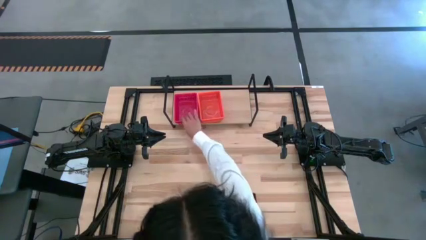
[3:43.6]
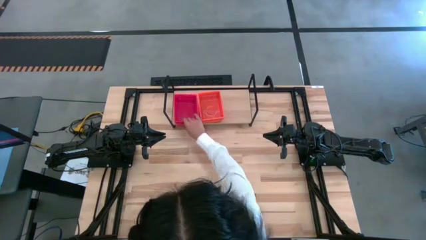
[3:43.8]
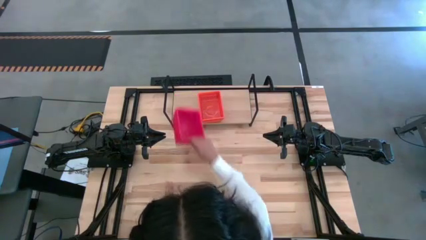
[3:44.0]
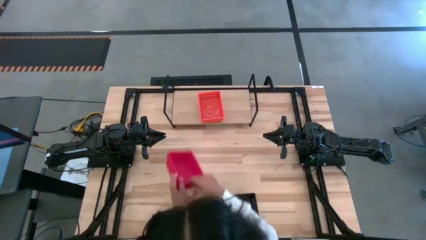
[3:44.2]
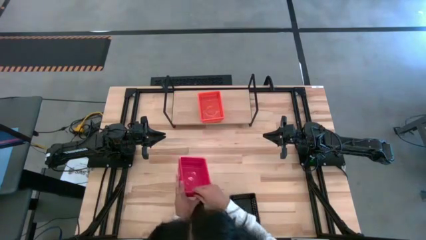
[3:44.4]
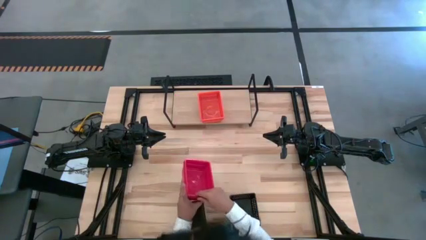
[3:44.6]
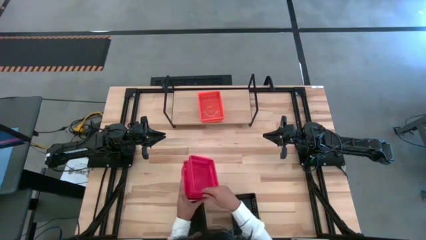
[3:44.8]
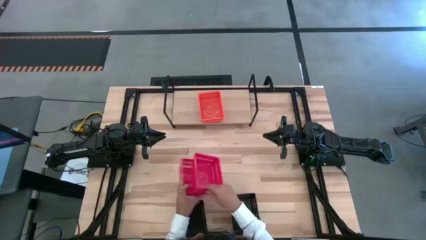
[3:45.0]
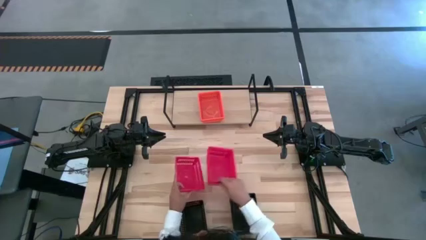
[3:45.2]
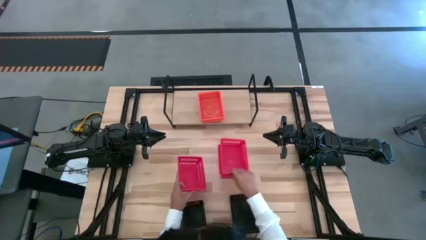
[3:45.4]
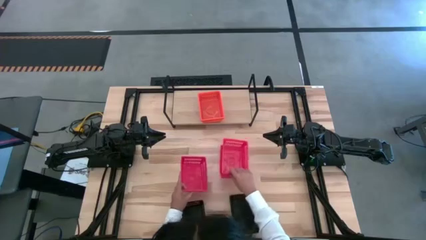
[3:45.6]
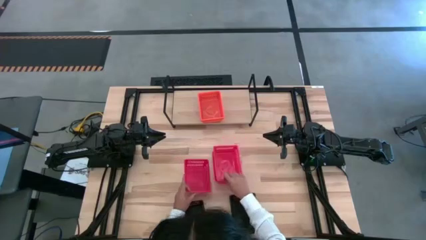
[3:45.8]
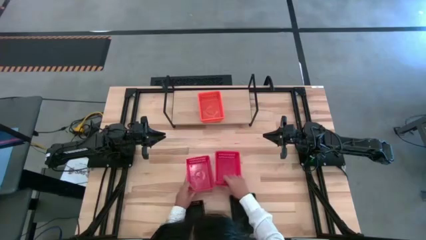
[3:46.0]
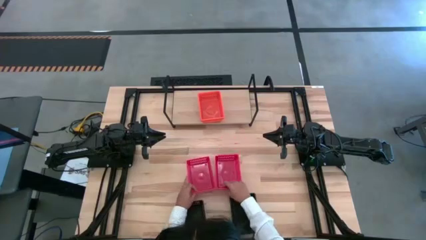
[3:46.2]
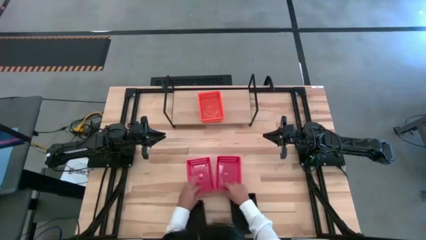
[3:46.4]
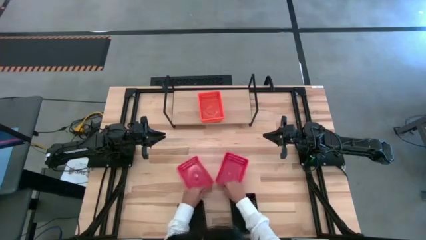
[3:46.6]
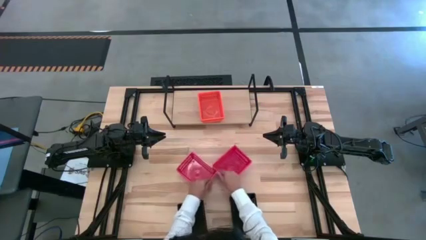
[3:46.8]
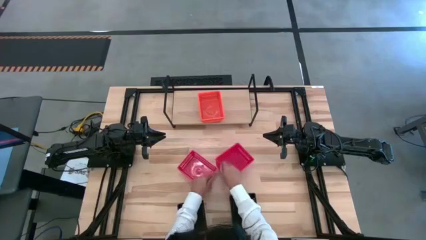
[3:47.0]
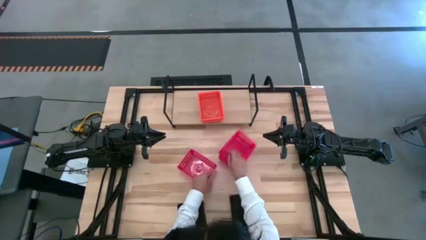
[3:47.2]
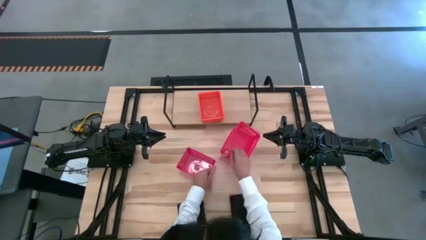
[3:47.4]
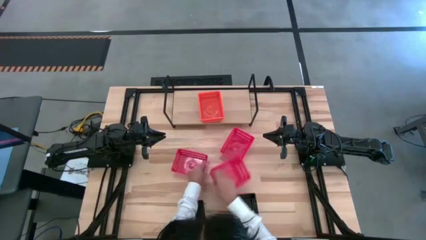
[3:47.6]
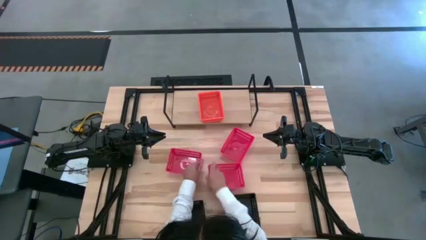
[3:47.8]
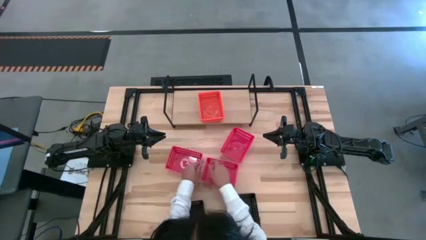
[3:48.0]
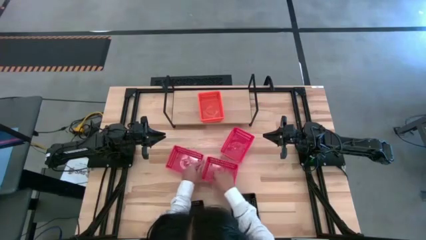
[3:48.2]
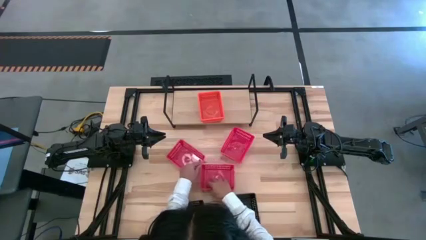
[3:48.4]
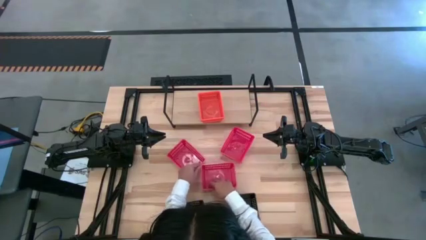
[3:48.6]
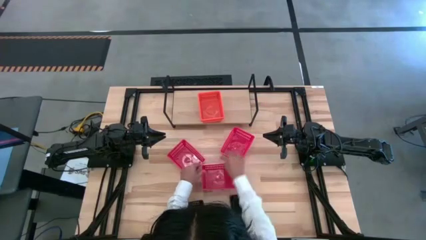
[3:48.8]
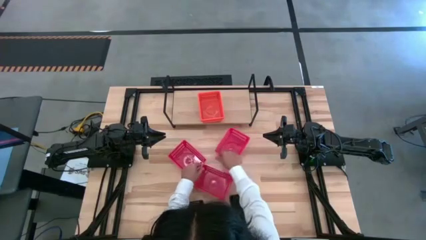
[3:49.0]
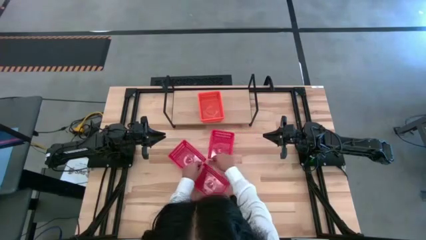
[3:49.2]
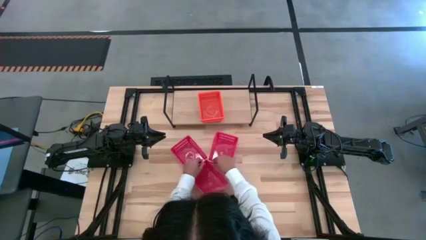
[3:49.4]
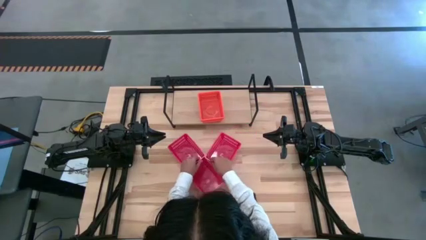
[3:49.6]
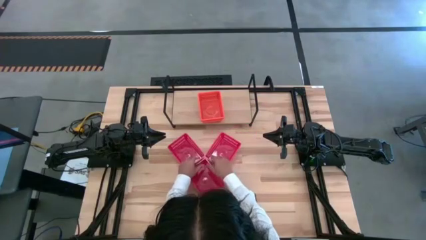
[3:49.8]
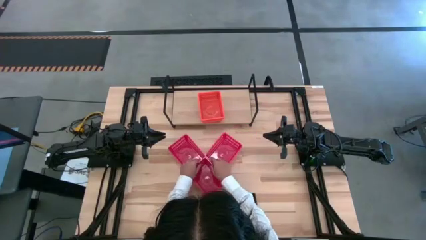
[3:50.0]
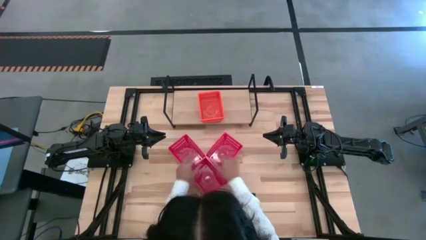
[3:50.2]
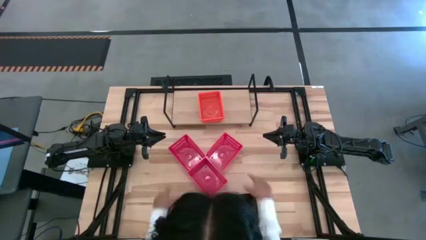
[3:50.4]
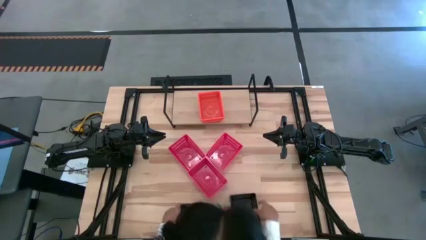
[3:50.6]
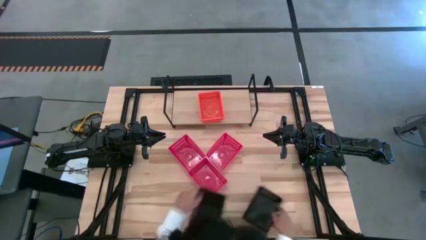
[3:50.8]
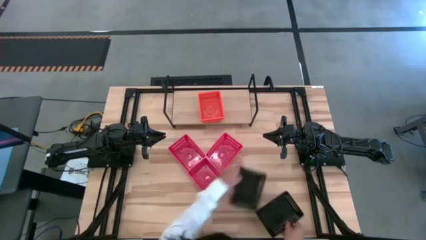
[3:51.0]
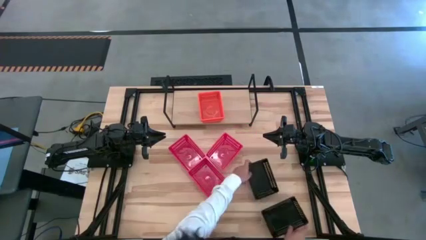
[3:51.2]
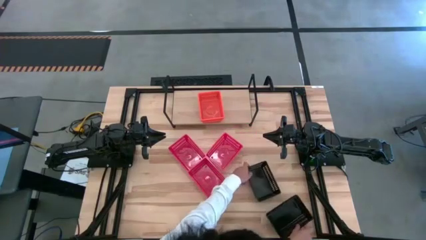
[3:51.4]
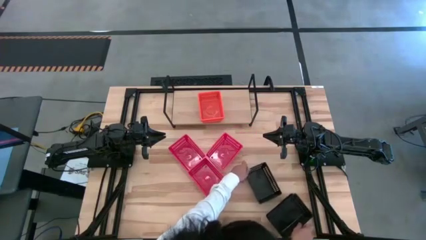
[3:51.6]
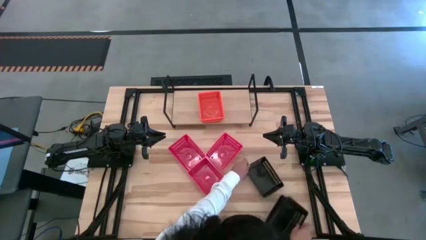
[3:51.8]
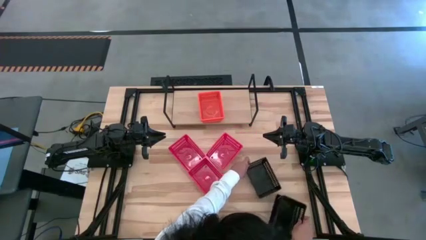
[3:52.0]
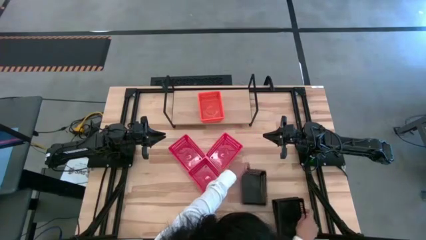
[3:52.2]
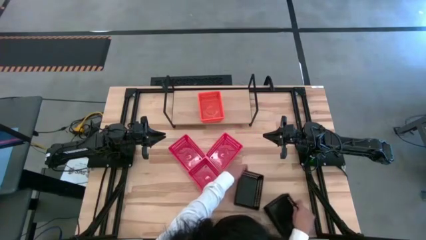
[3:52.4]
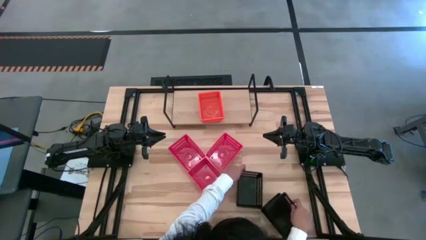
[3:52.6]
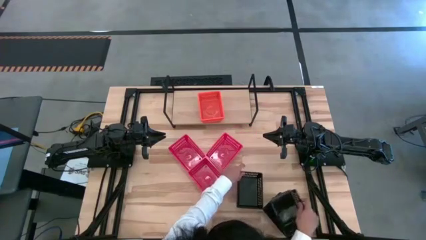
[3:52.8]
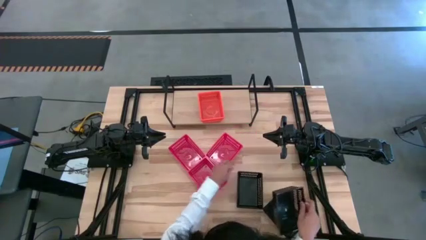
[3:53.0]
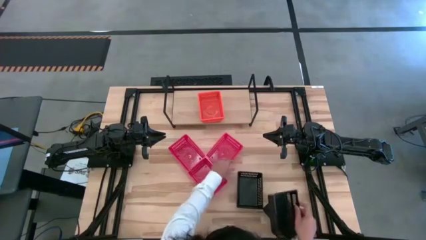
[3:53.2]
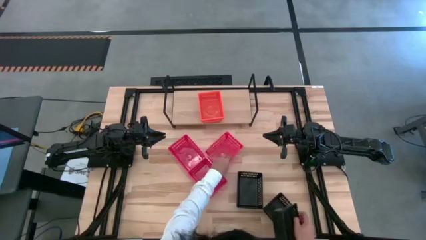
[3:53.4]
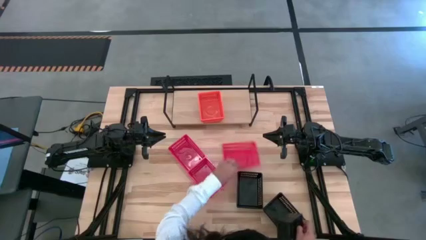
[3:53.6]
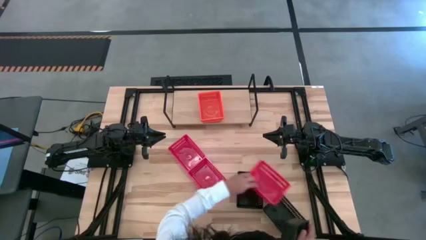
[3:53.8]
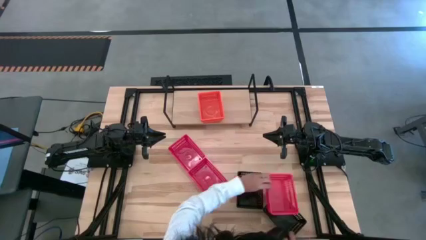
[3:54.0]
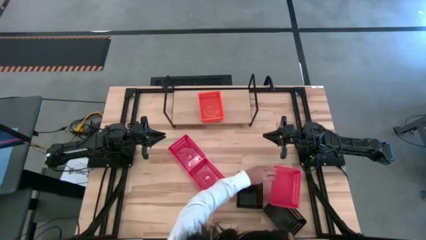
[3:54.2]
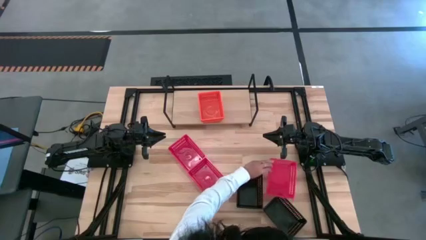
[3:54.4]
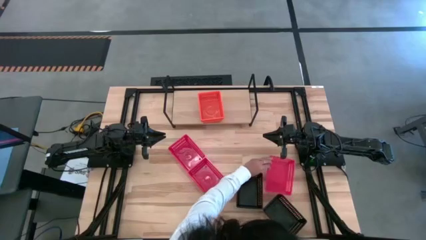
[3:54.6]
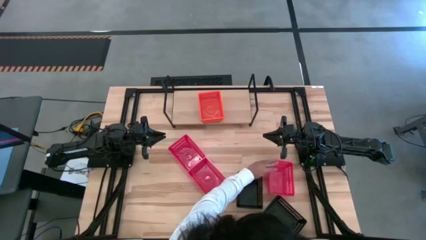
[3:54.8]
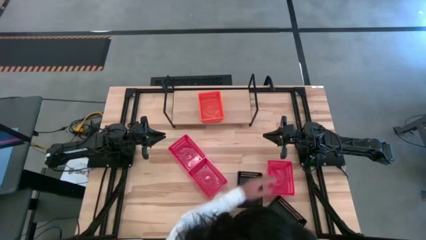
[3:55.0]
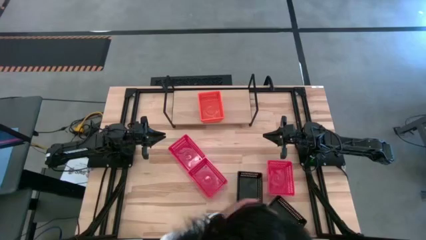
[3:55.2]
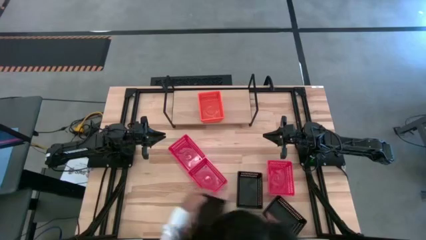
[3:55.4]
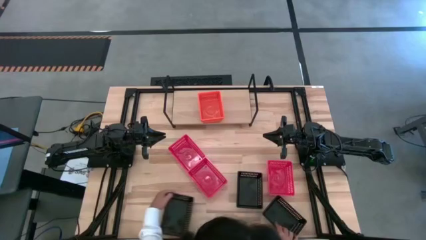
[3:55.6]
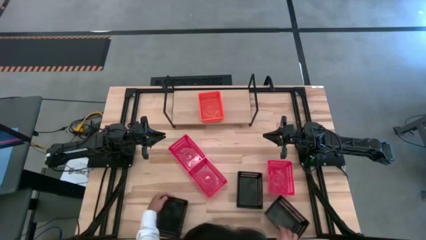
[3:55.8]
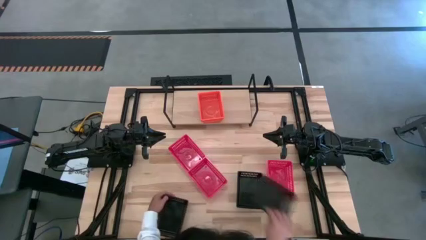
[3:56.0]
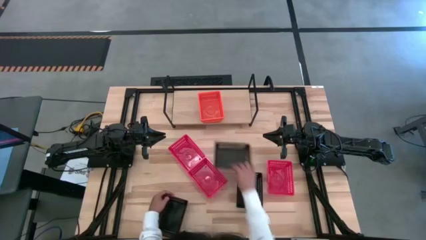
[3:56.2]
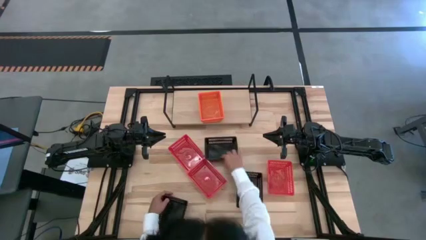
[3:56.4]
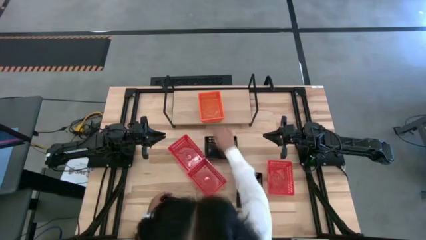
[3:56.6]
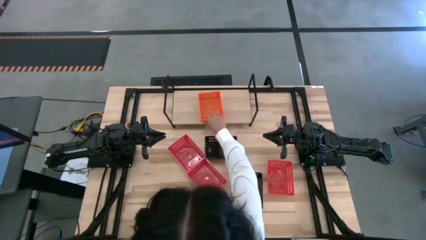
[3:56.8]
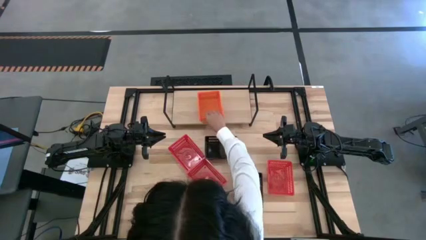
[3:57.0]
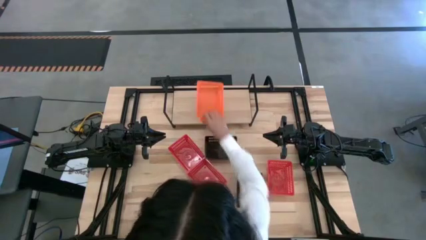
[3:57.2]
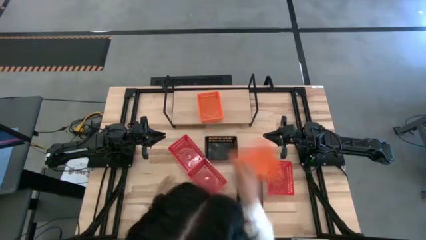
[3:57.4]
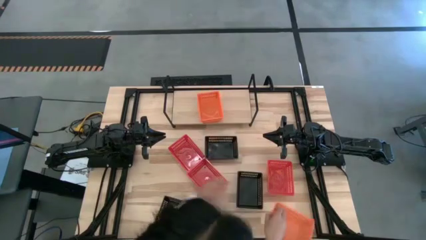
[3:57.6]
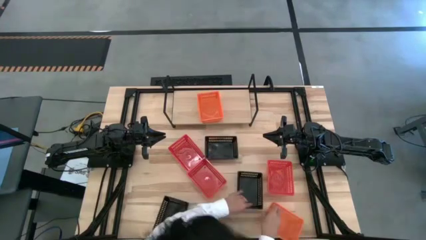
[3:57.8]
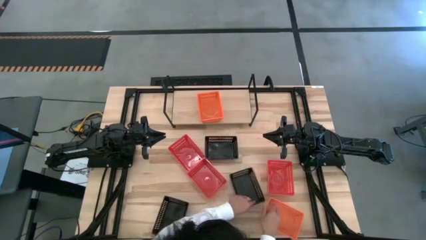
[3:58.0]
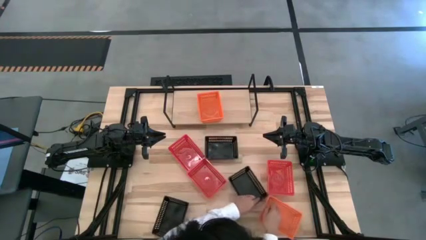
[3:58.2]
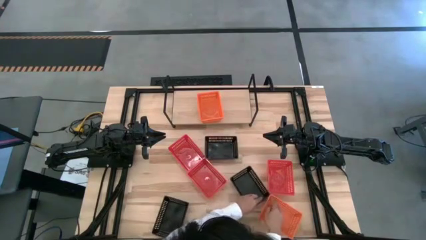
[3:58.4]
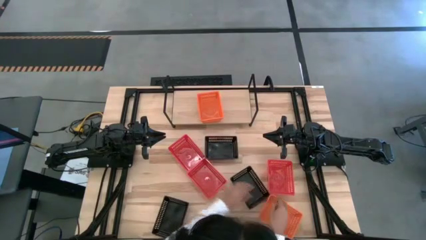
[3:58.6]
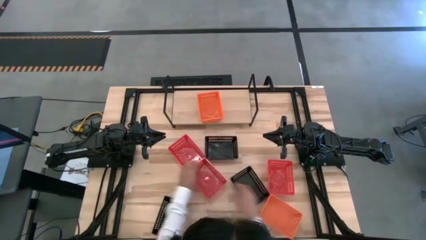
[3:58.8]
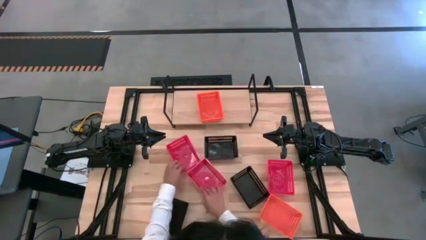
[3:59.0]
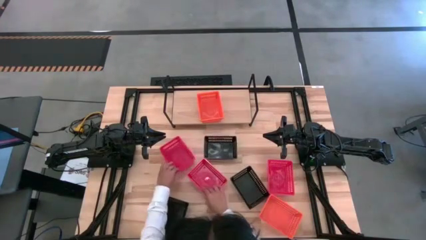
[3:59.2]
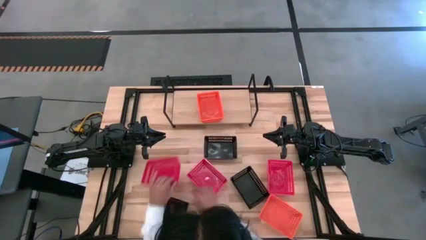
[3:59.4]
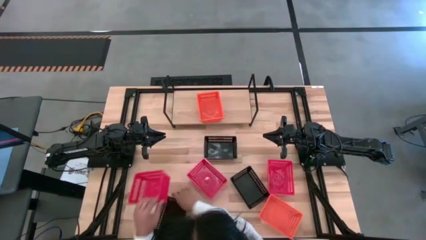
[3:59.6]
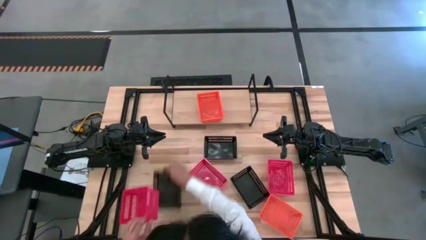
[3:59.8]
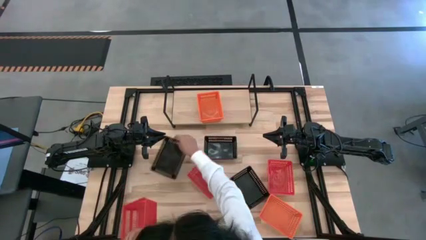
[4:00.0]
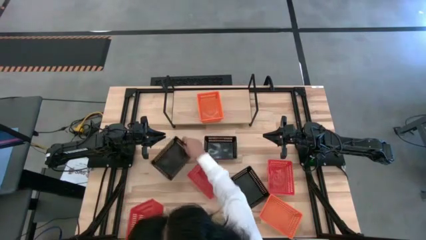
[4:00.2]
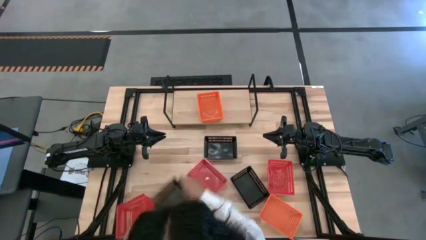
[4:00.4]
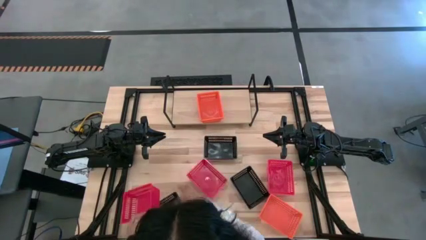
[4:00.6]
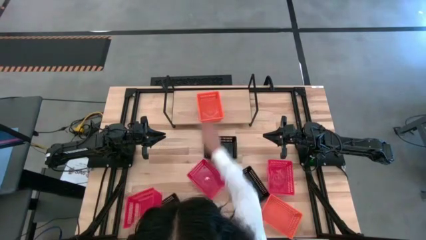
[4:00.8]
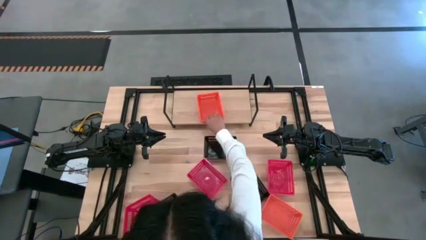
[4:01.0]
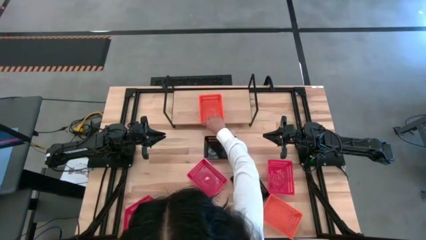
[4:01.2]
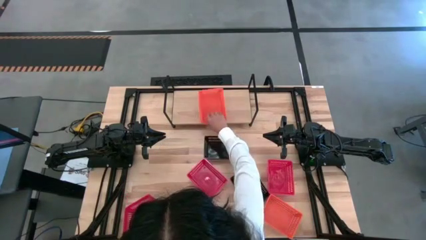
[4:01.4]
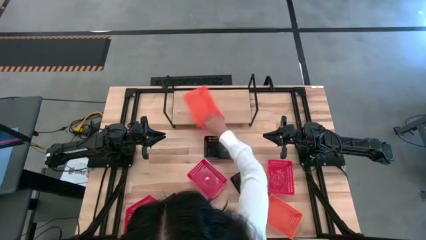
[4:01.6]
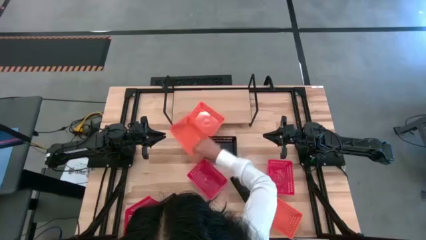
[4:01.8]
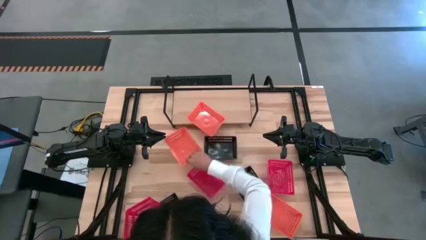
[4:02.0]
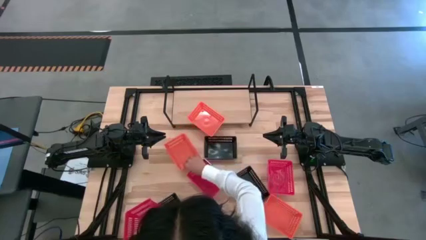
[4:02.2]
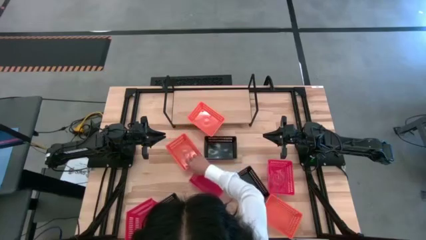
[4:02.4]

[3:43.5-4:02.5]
Task: Stack baskets on shelf by color
Return to Home Position
